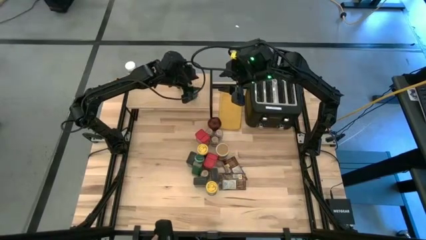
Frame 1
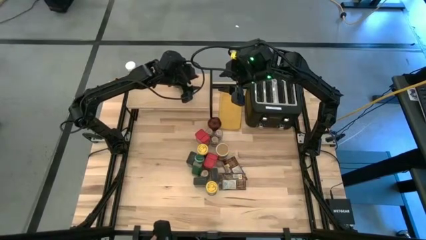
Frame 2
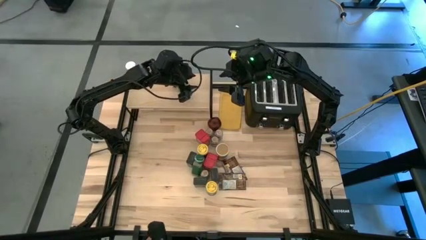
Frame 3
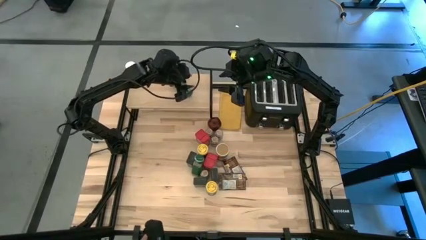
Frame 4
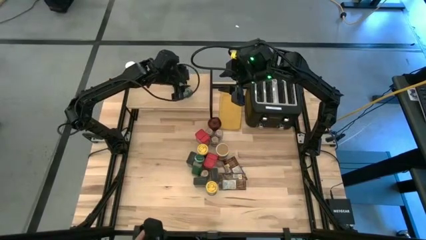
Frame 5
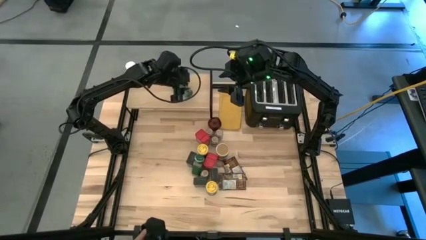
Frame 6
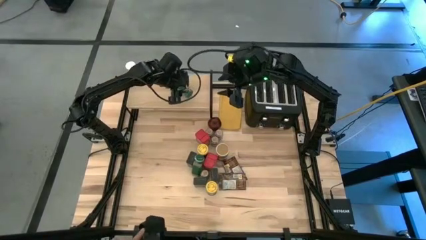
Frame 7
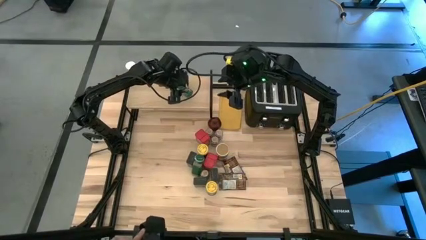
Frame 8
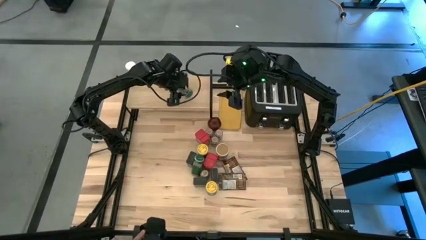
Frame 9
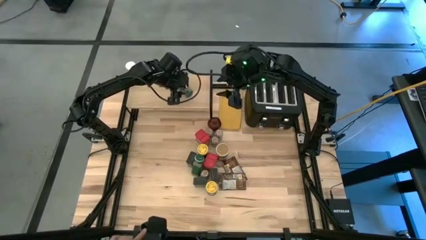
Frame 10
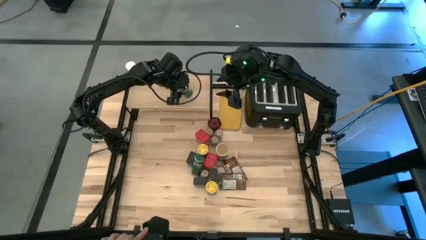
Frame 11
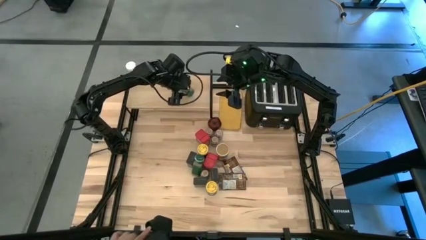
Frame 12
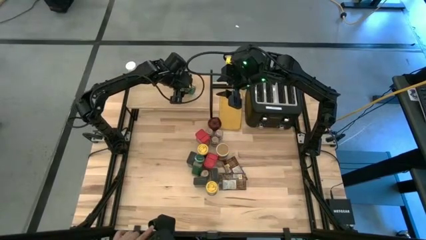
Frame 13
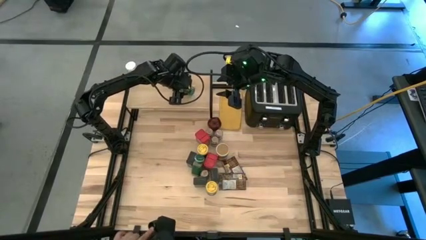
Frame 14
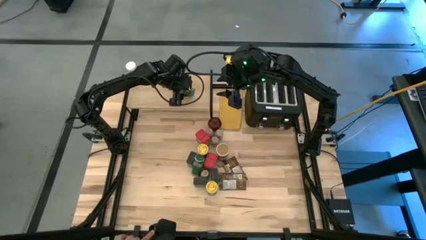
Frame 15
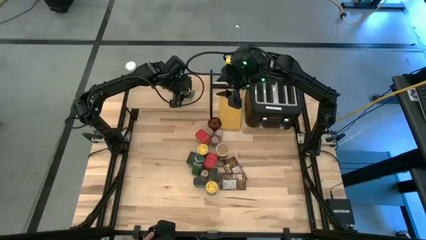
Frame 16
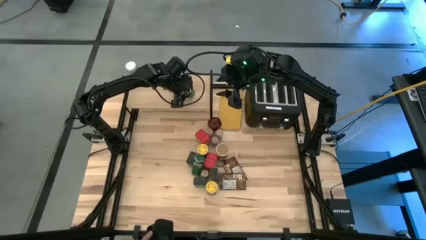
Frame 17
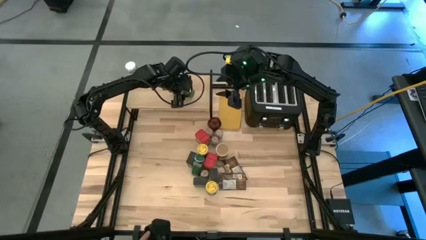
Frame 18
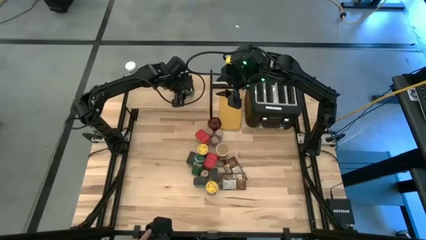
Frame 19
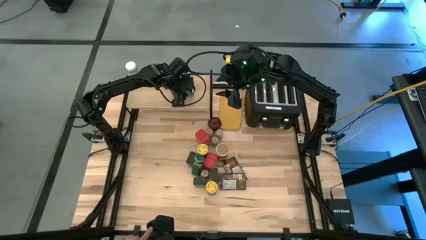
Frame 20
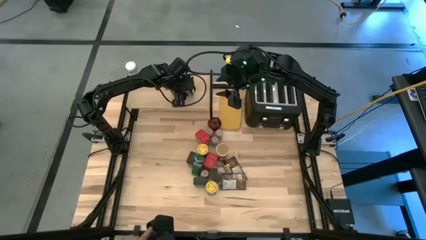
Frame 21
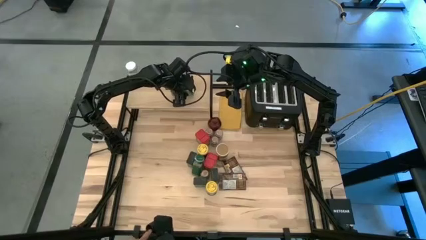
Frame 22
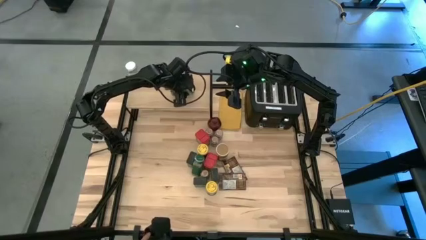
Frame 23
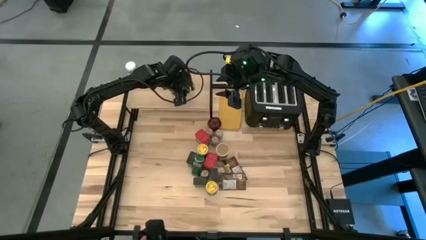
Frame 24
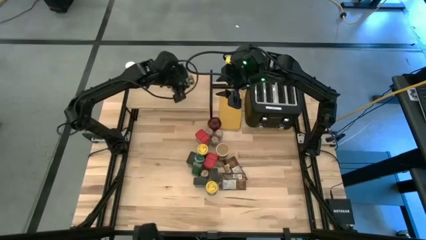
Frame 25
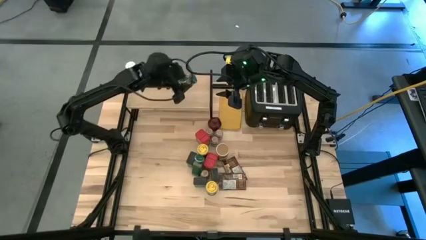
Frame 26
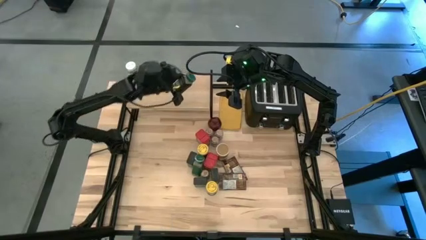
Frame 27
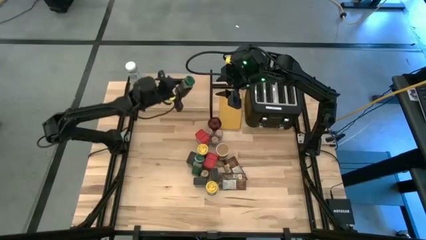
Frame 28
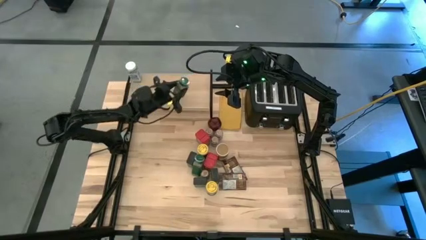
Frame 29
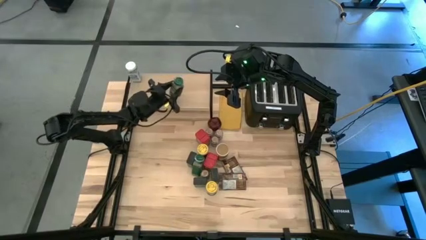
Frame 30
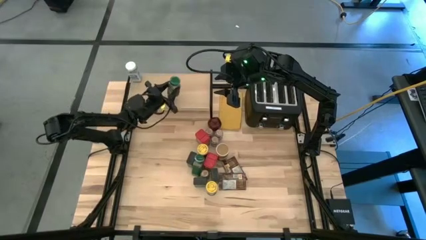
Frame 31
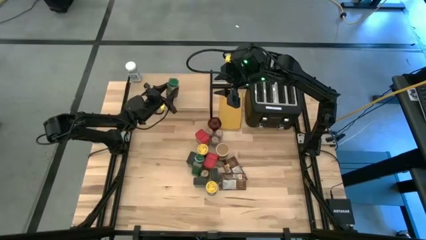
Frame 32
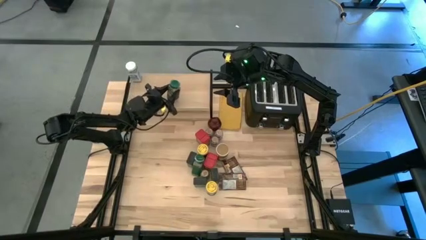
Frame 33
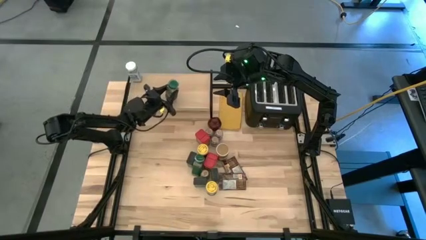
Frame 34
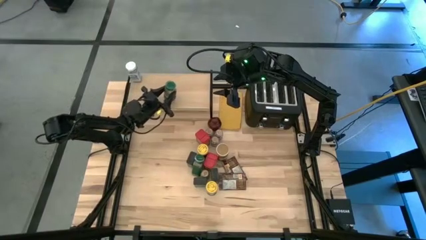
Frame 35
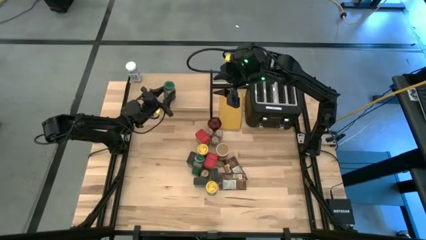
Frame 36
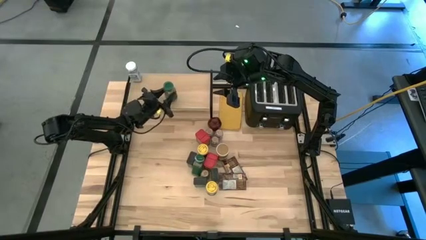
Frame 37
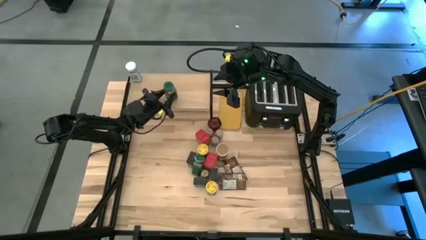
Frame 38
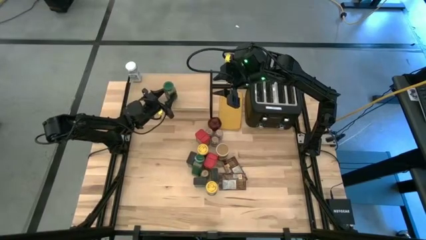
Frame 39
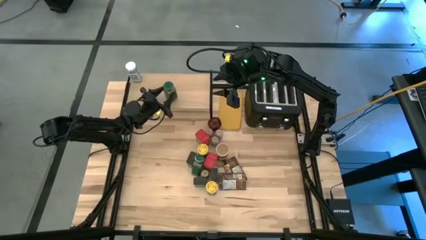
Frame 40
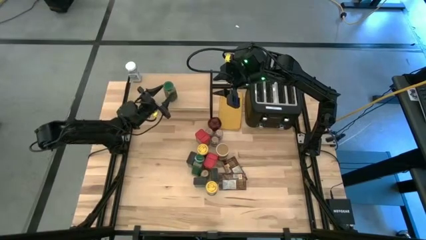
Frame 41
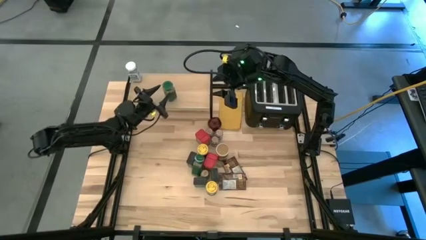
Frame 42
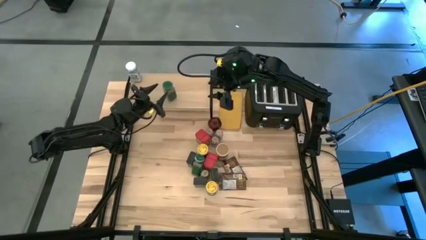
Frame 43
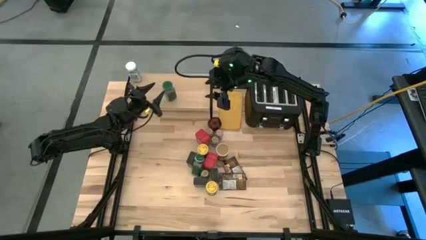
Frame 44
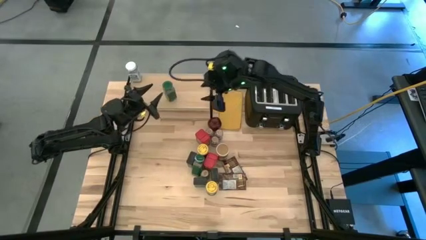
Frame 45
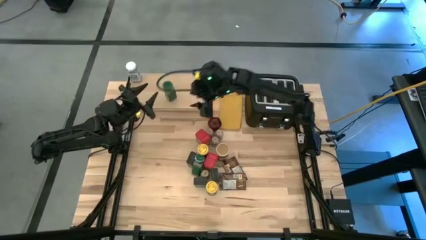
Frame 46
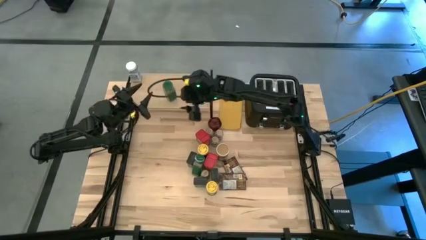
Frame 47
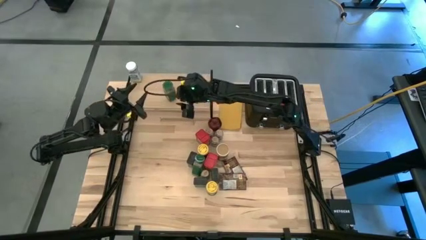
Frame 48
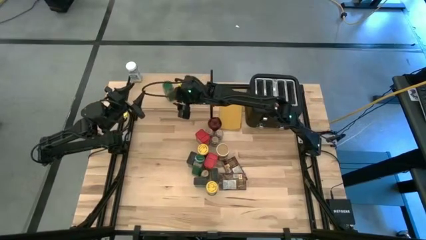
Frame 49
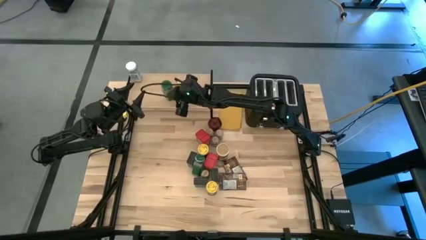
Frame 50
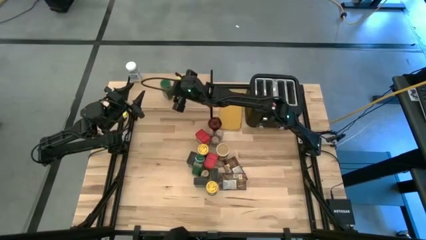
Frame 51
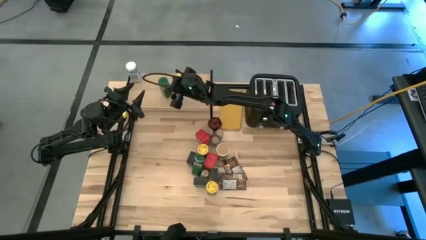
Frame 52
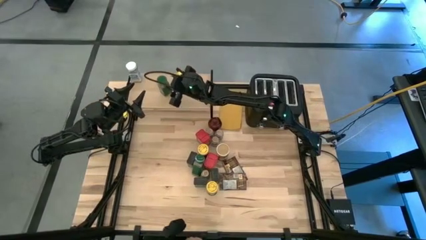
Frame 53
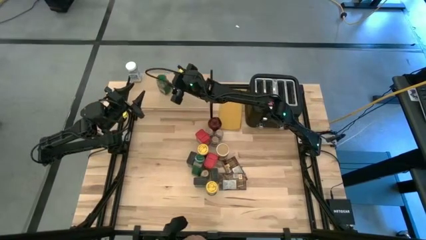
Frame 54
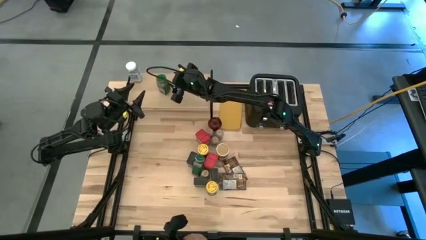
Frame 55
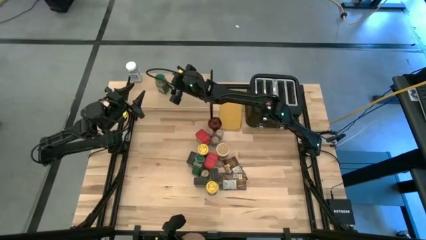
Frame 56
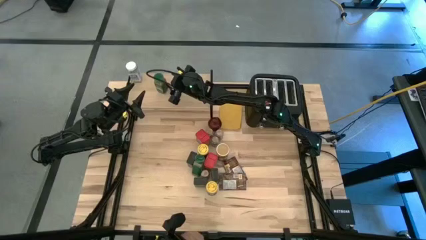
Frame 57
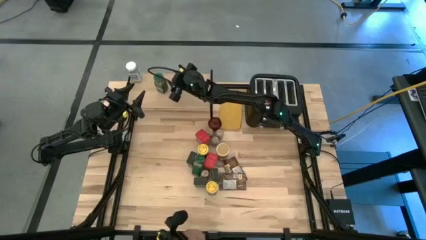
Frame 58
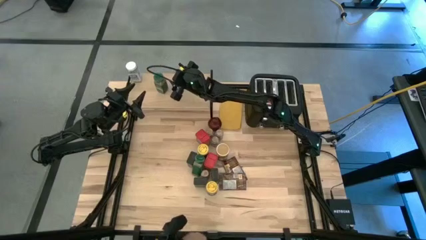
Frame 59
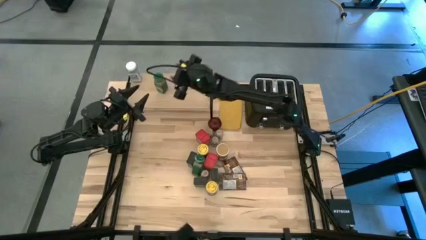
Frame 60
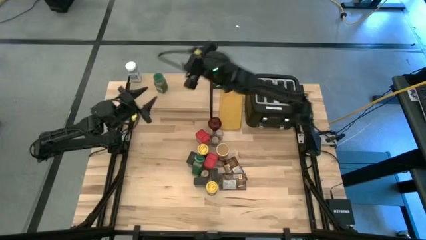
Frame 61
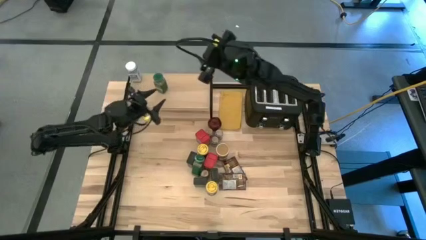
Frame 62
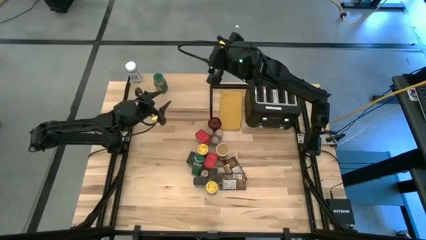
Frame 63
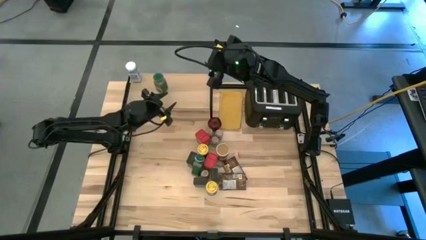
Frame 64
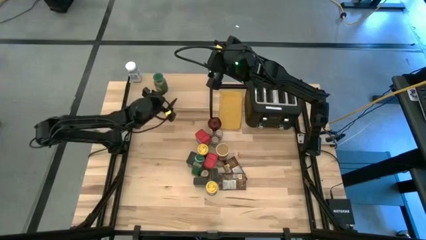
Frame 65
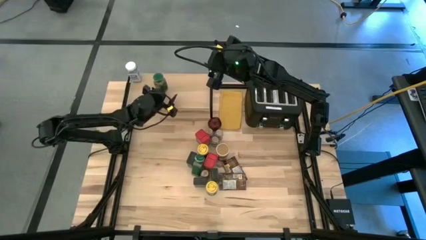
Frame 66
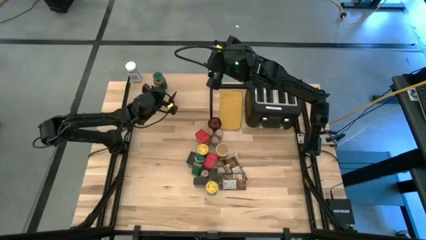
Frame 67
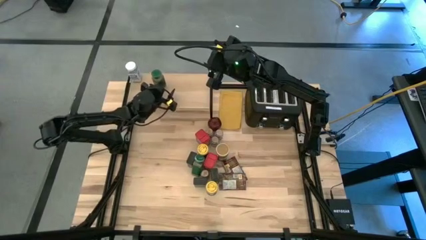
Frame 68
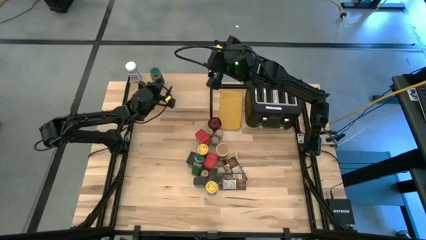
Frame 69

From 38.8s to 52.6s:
Task: Shelf spices
Put the bottom green seasoning bottle on the shelf

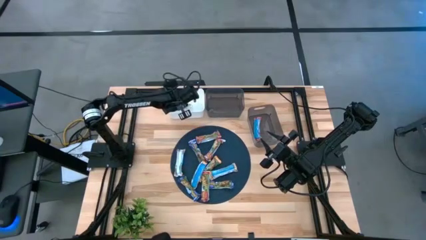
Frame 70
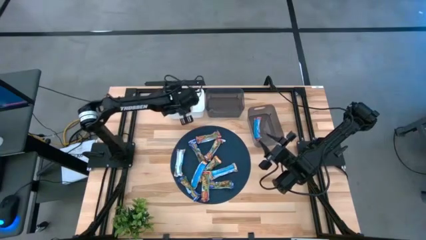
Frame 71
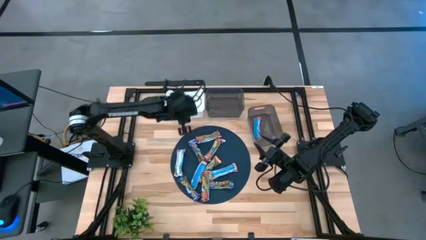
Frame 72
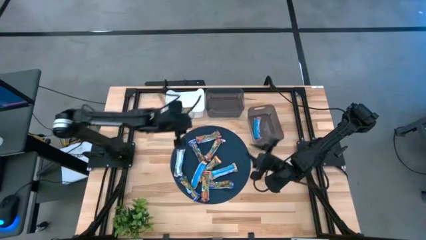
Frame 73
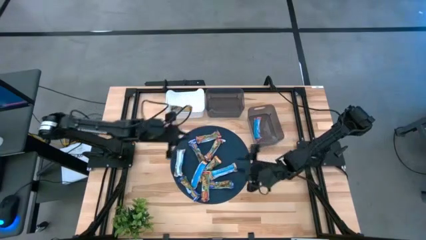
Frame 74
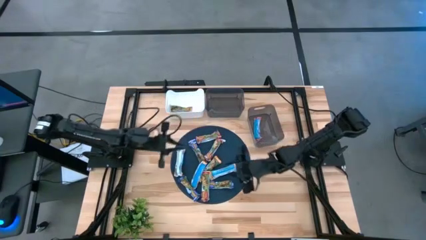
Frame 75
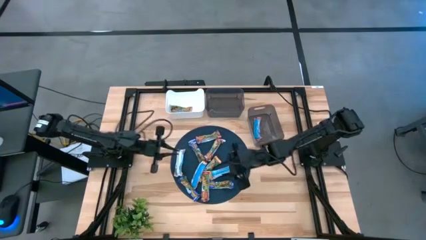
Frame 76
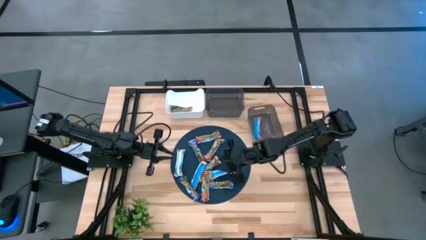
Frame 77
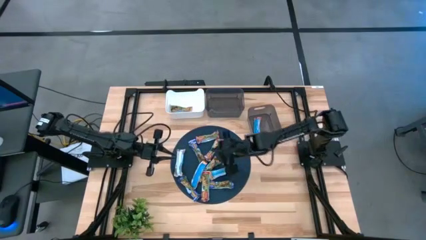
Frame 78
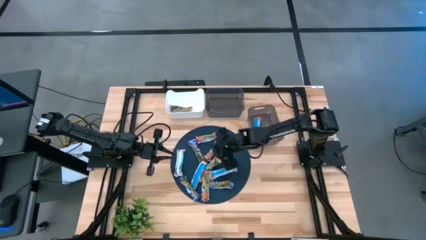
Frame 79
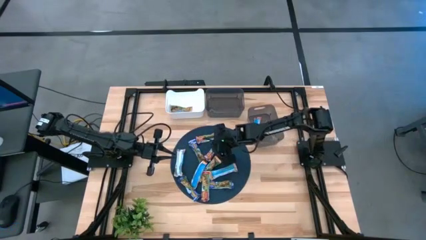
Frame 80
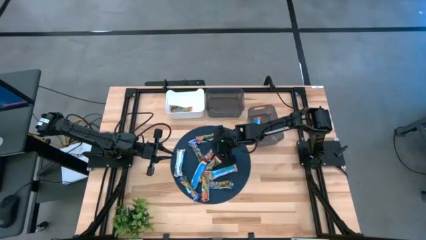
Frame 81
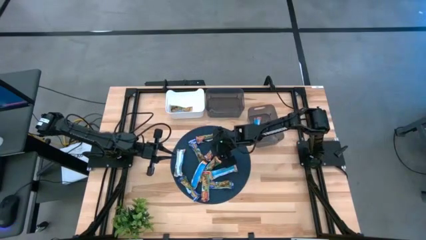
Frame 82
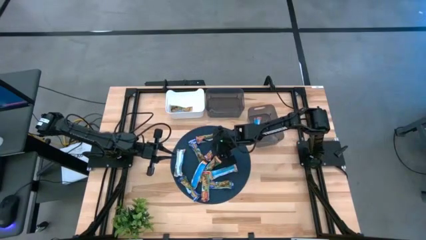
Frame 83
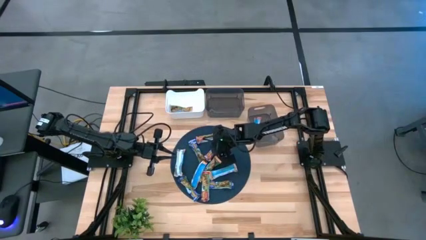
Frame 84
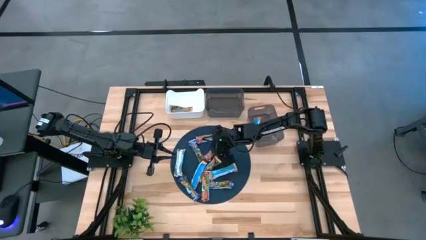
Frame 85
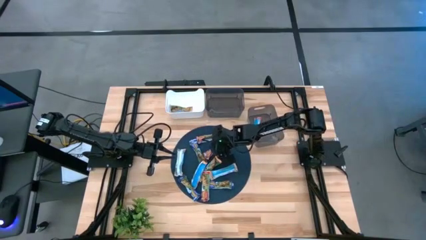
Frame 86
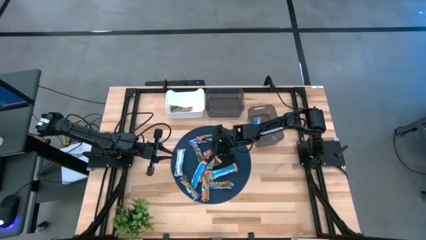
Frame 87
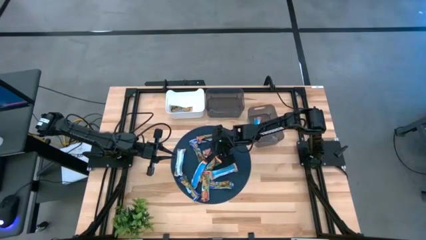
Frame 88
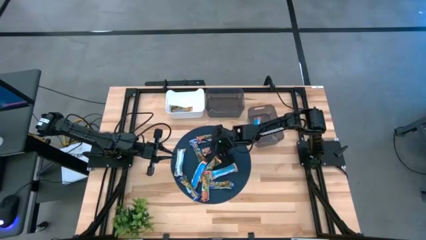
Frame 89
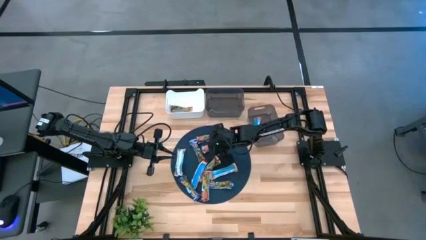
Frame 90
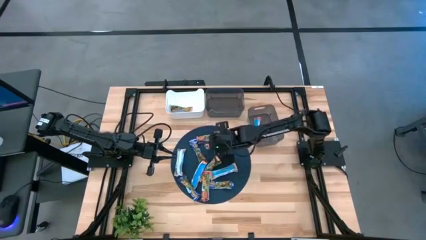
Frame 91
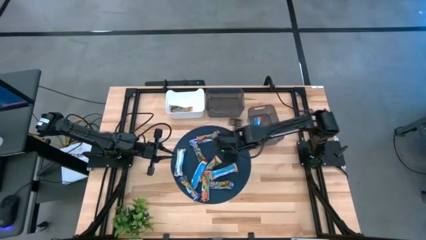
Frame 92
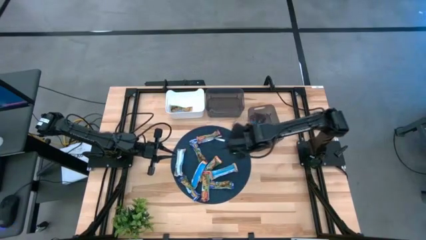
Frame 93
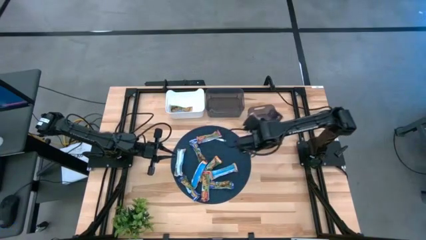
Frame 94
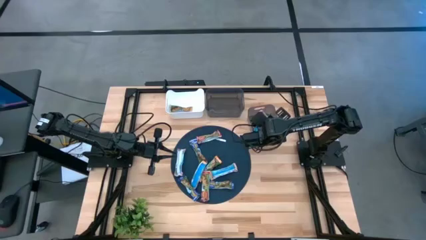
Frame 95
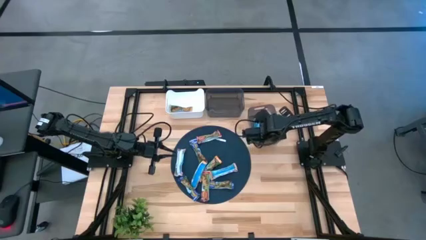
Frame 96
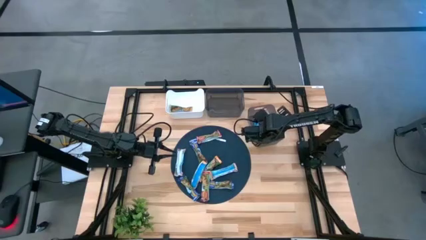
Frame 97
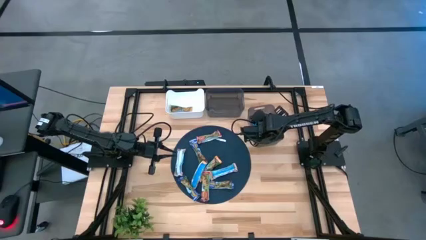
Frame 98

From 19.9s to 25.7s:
Task: Pick and place Granola Bars by type
Put the red granola bar into the bottom black bin
